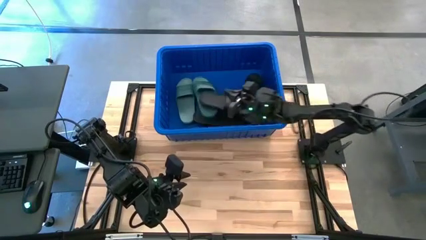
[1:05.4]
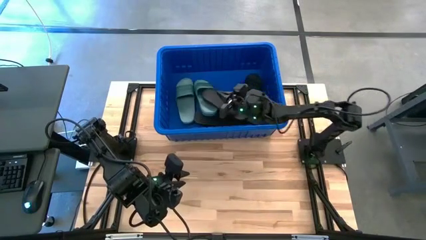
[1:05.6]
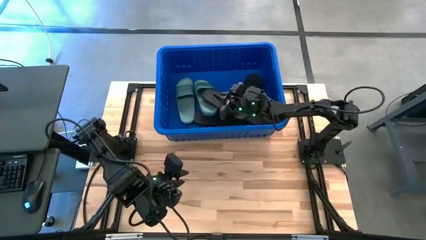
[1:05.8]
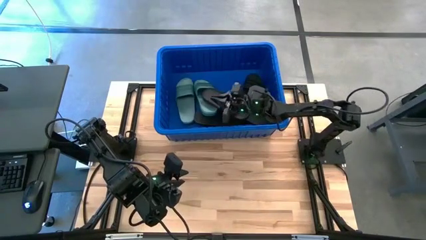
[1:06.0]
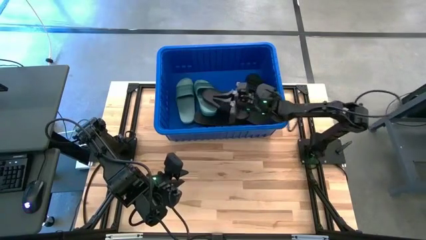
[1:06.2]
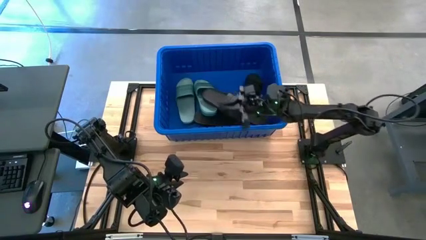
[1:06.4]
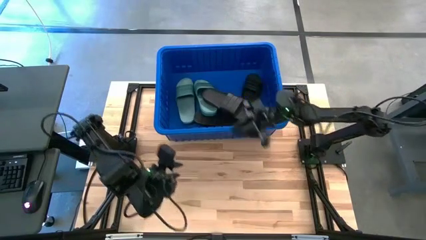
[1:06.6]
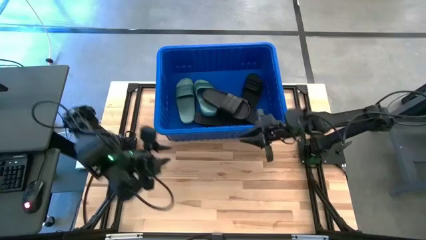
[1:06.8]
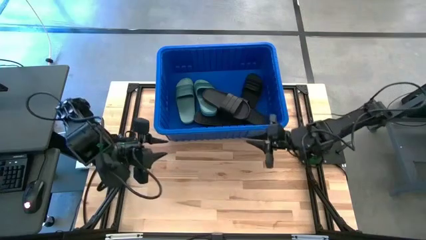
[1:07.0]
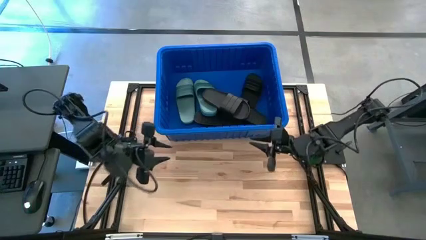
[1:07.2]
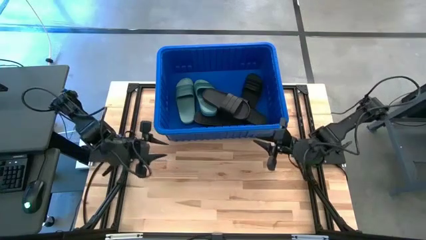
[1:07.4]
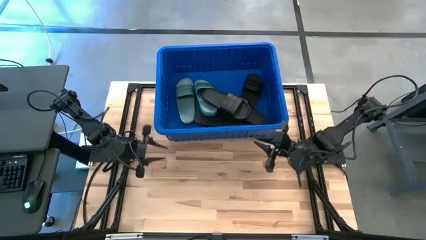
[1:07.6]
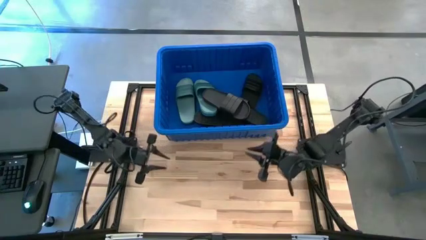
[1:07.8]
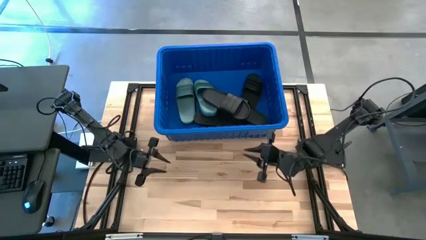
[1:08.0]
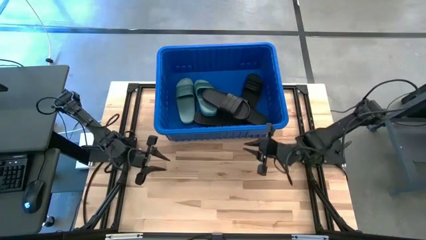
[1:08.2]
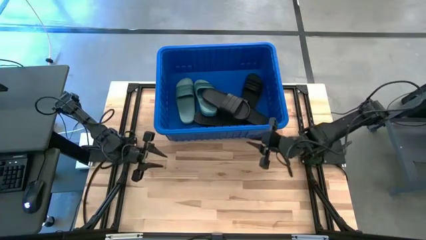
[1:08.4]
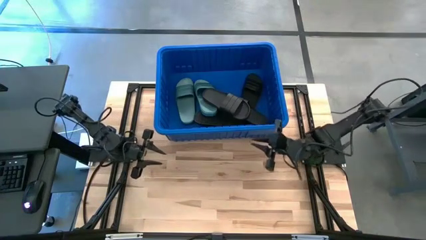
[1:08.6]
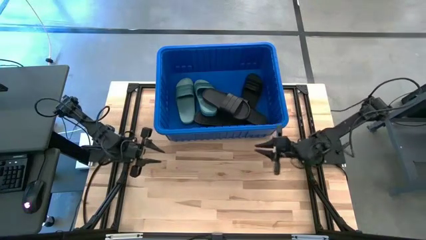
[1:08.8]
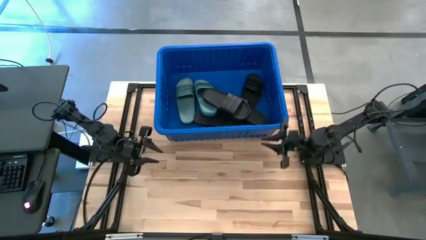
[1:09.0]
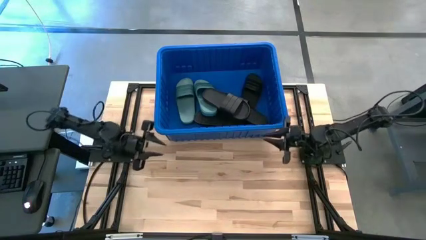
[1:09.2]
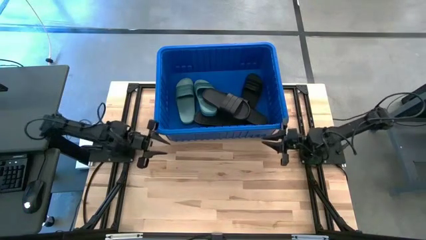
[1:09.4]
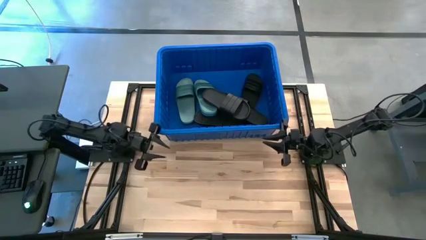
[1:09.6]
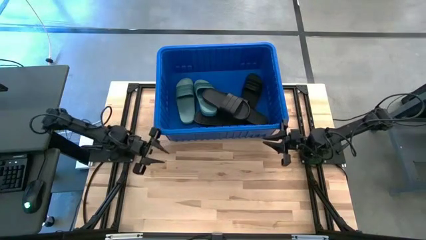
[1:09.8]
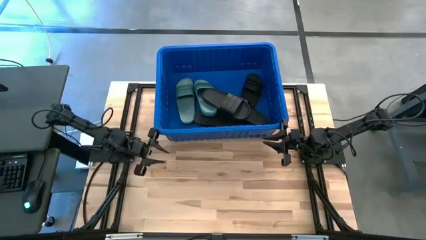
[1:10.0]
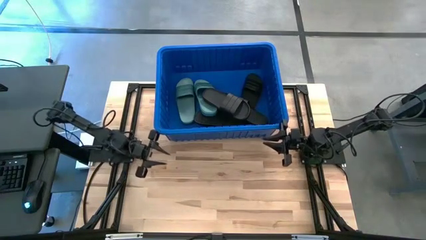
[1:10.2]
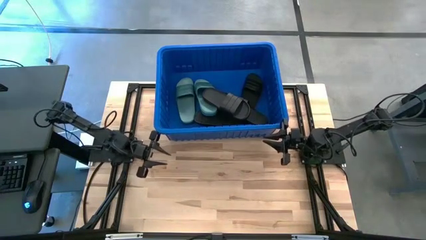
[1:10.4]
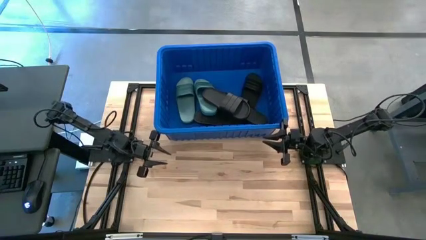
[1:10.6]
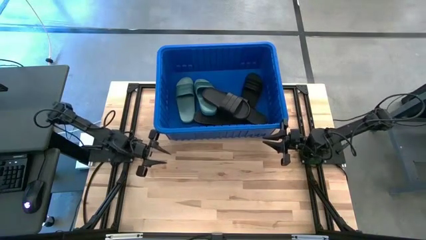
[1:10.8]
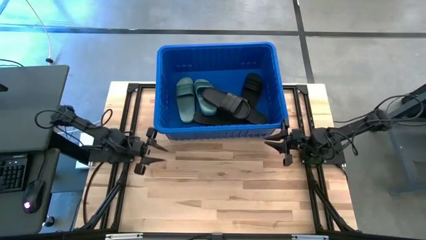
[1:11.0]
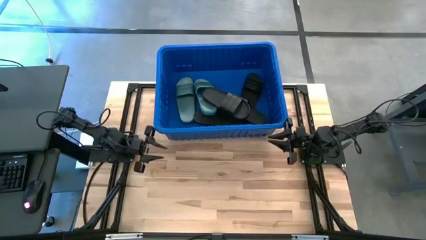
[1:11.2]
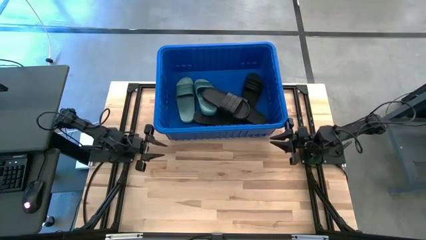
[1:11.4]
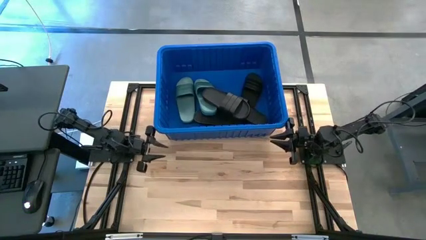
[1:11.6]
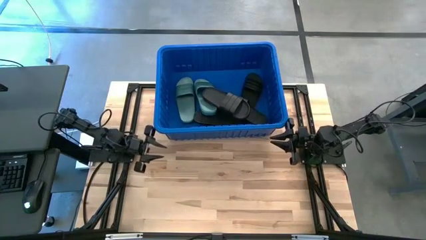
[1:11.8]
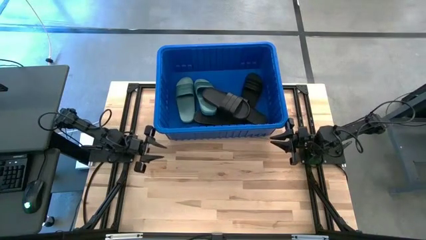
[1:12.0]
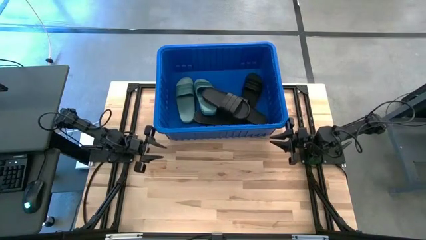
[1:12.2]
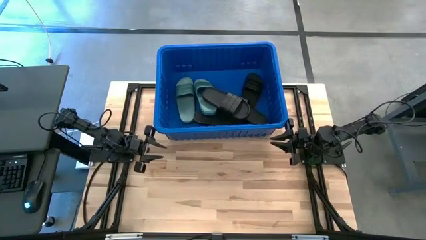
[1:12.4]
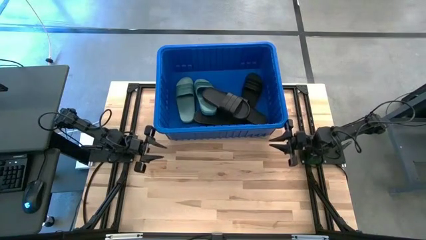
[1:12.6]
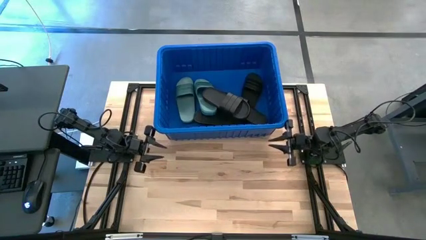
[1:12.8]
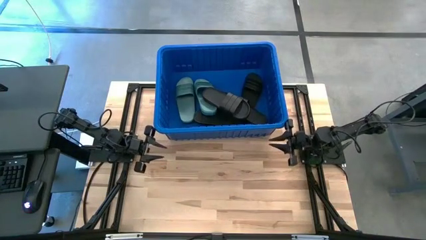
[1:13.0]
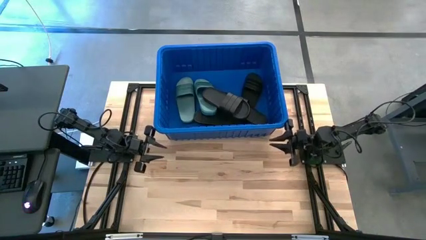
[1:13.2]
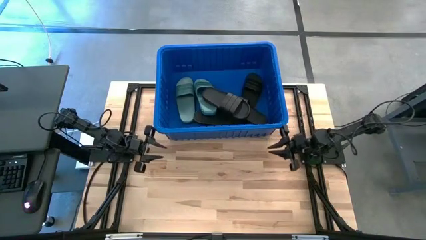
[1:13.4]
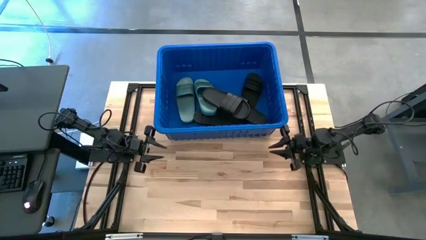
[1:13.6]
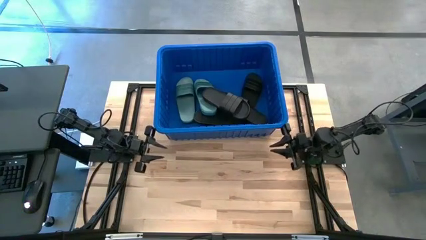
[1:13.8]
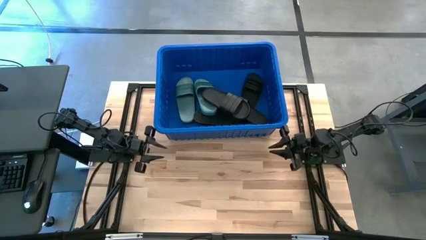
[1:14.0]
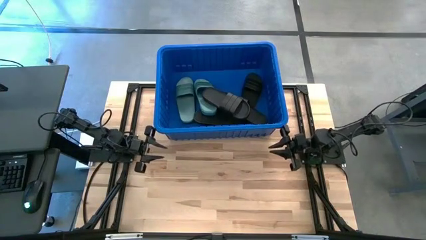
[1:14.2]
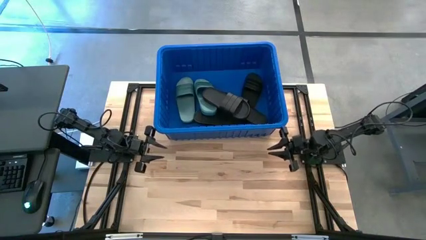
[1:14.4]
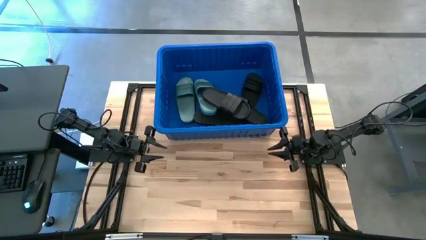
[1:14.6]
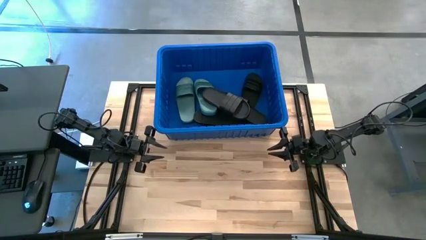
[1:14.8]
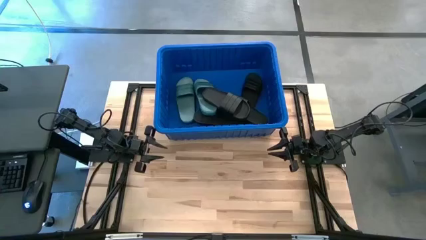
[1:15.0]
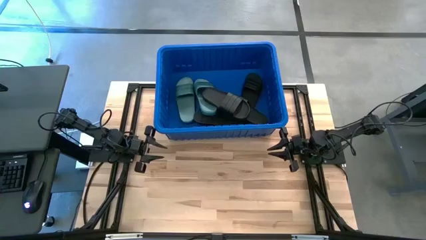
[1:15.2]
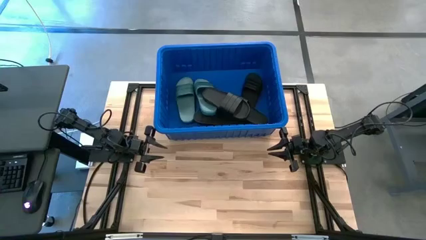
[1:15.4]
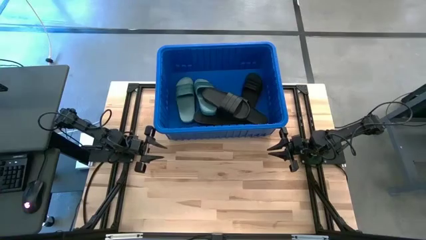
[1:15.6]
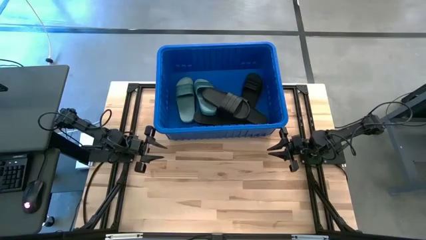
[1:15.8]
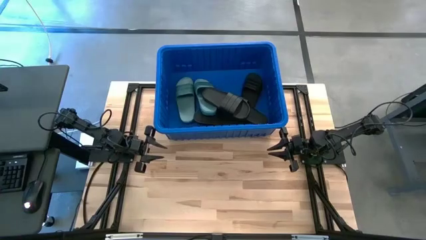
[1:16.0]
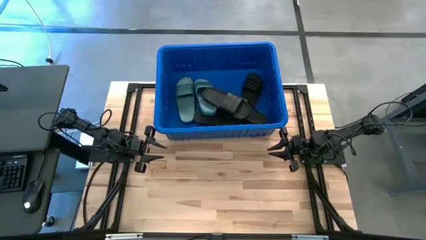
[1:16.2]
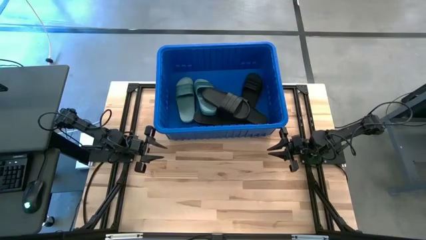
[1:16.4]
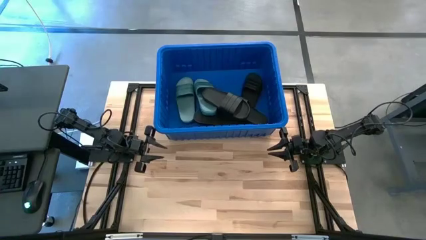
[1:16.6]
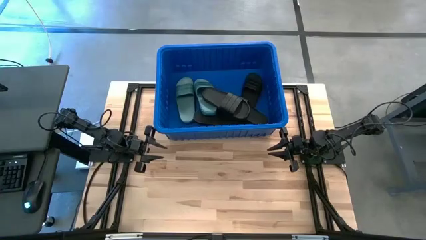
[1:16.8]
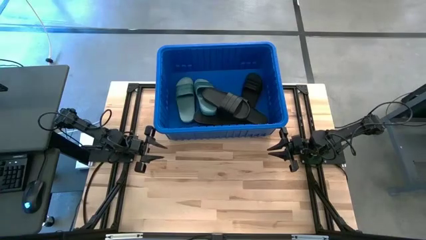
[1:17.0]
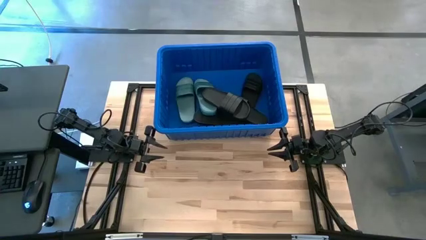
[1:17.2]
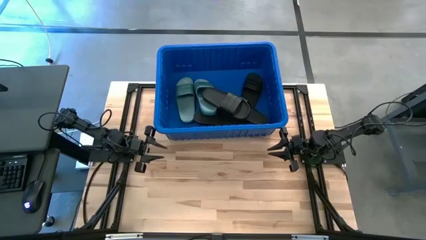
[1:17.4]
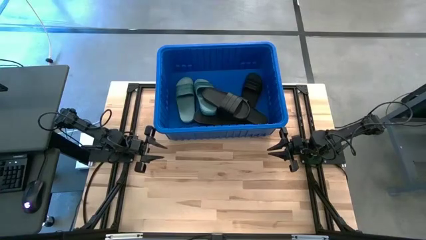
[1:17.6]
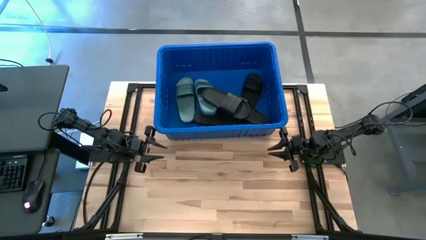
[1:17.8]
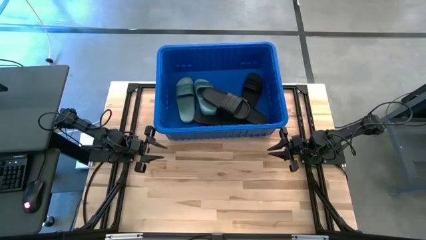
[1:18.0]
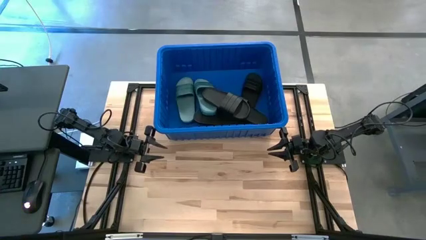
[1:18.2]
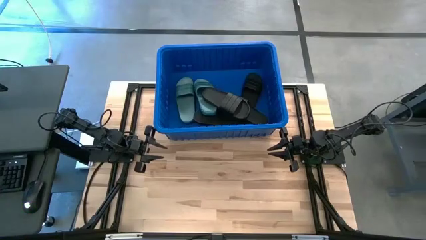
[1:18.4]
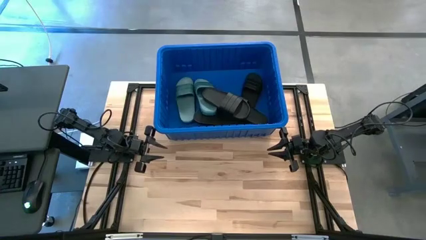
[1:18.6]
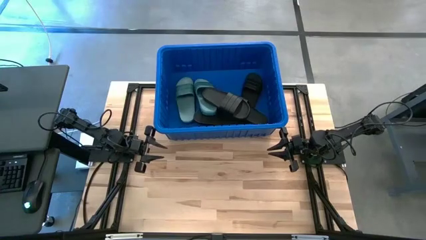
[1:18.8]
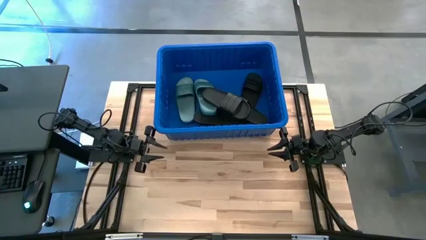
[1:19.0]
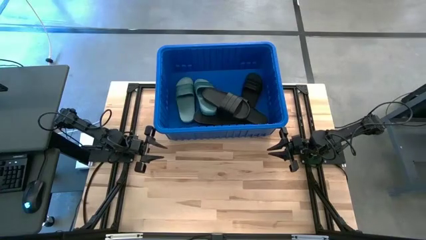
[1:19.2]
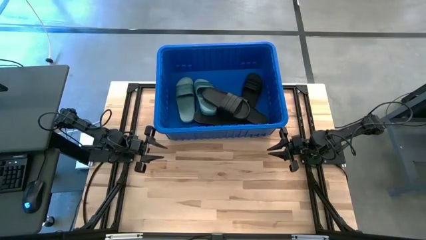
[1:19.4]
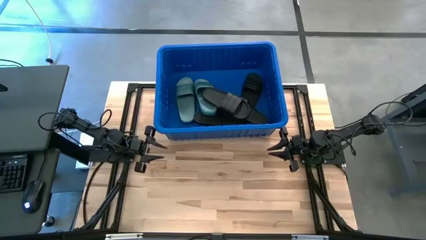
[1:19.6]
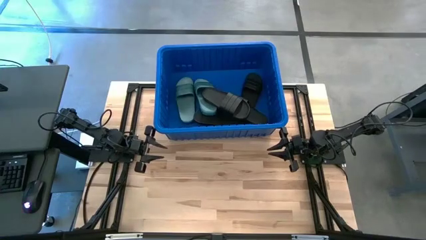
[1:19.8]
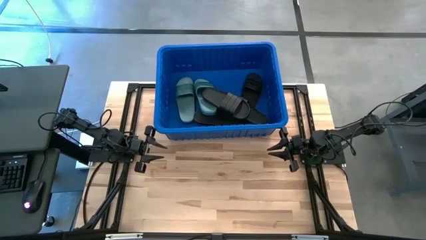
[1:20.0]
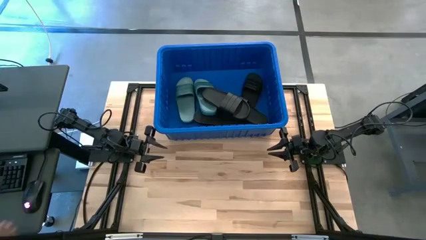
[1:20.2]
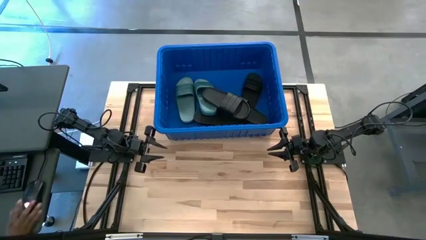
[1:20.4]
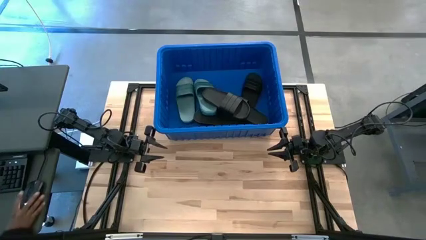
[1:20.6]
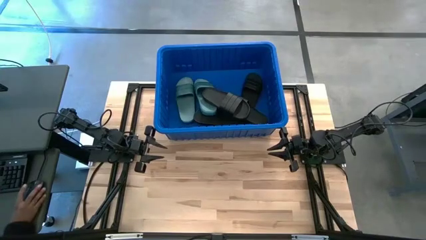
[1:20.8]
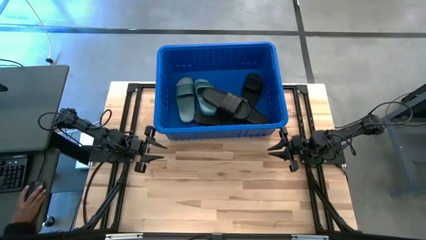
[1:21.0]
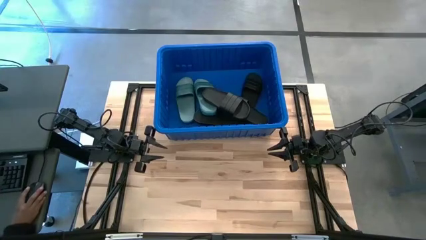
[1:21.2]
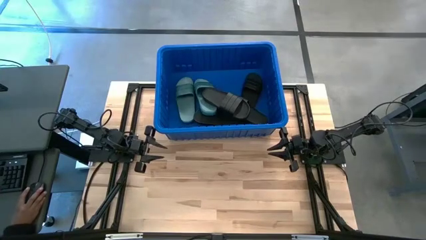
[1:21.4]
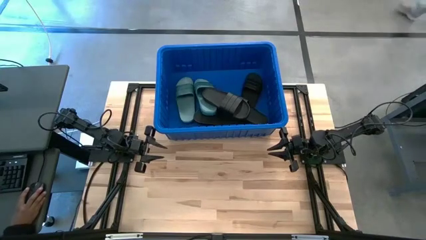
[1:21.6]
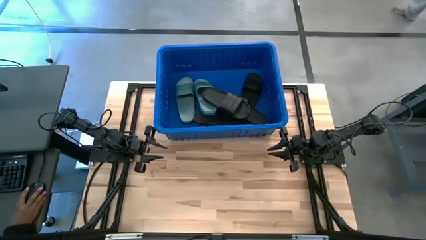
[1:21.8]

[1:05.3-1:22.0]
Task: Pick and place slides into bin
Return to Home Position

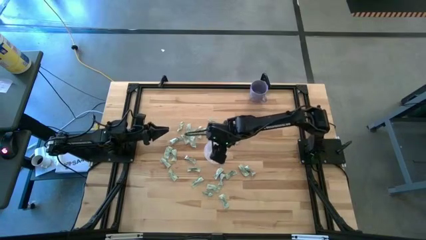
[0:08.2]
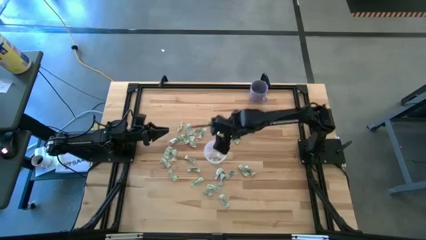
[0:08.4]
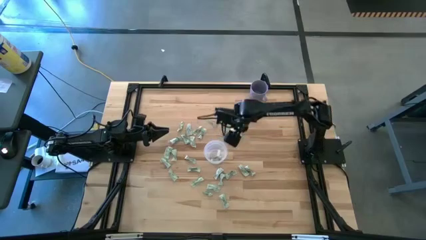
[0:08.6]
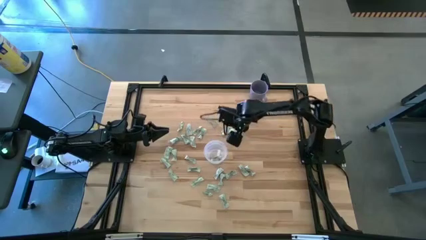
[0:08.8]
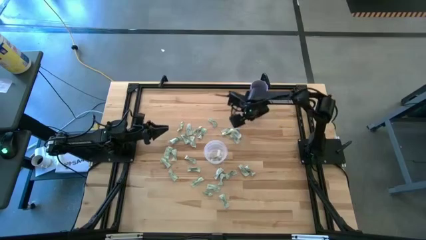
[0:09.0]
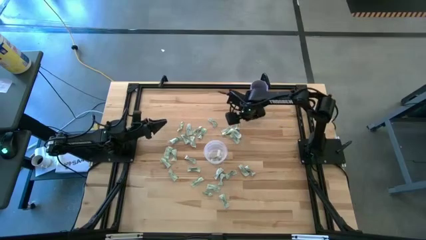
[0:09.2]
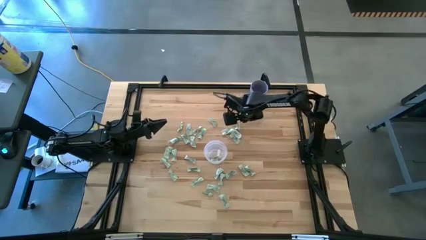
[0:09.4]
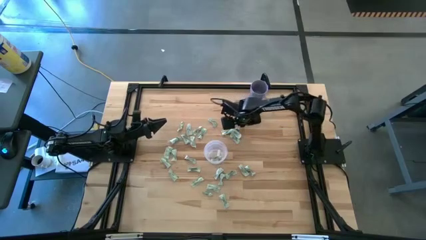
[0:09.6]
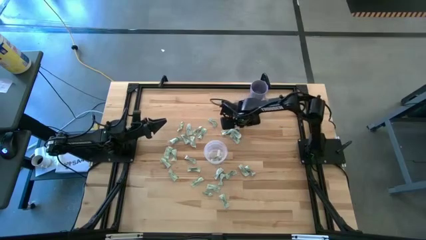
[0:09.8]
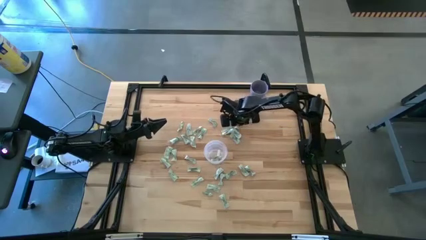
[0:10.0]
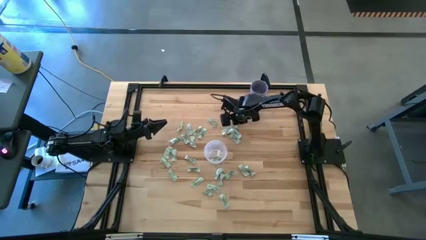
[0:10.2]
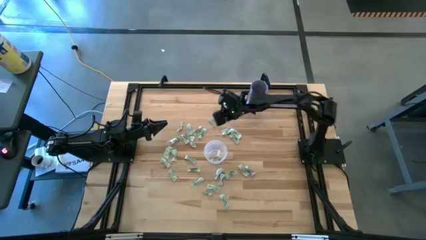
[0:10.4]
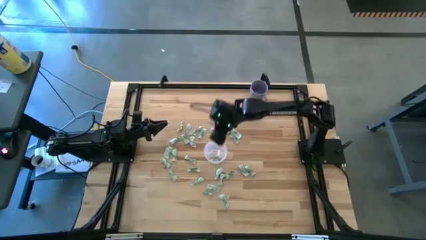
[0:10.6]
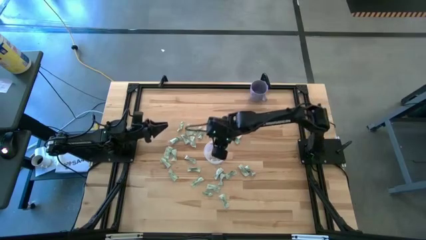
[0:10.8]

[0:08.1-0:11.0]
Task: Pick and place Stevia / Truvia into bins
Put the green stevia packet into the transparent container
